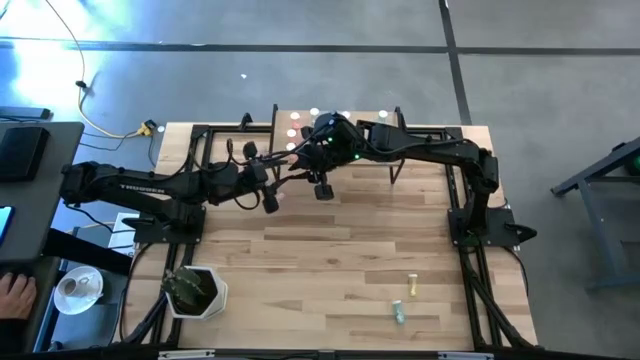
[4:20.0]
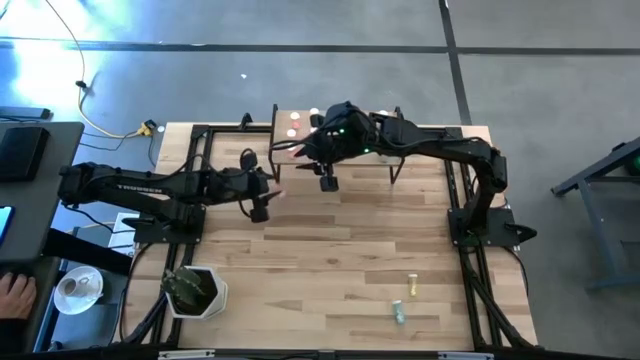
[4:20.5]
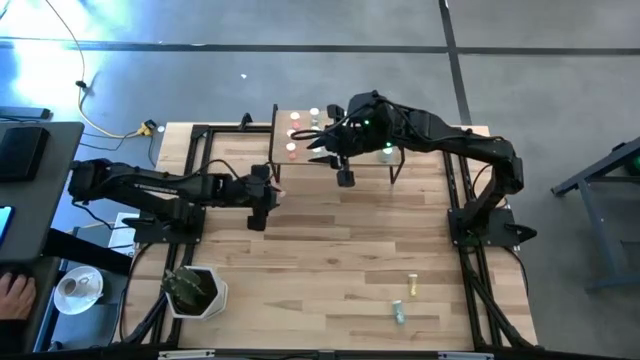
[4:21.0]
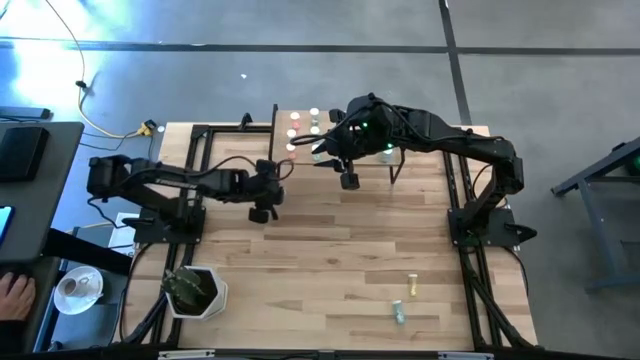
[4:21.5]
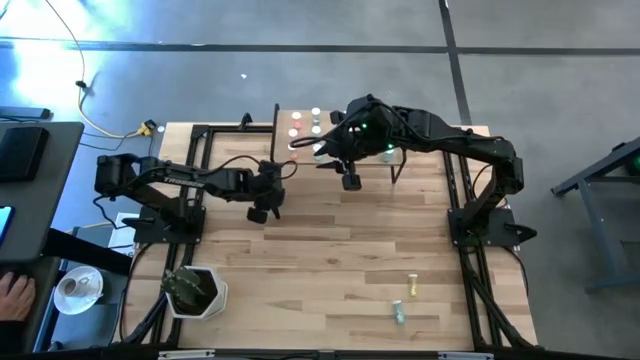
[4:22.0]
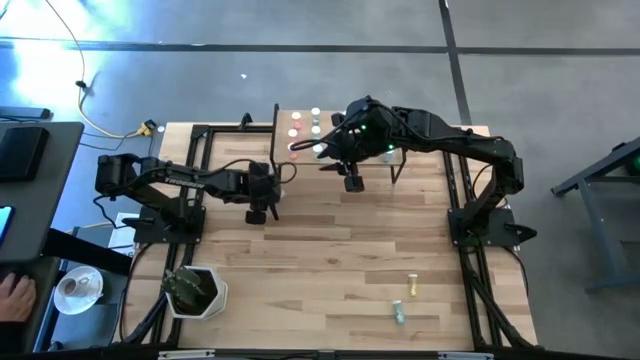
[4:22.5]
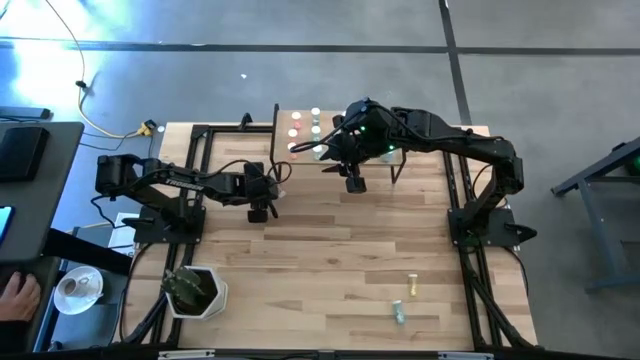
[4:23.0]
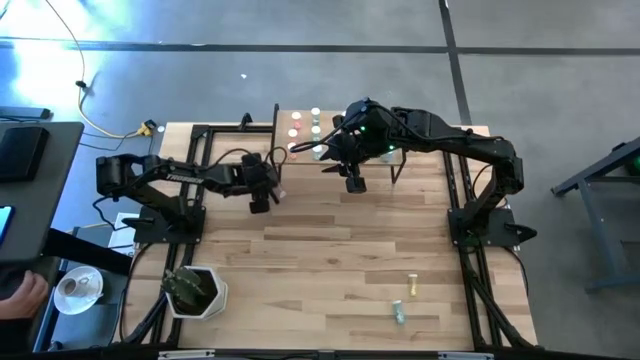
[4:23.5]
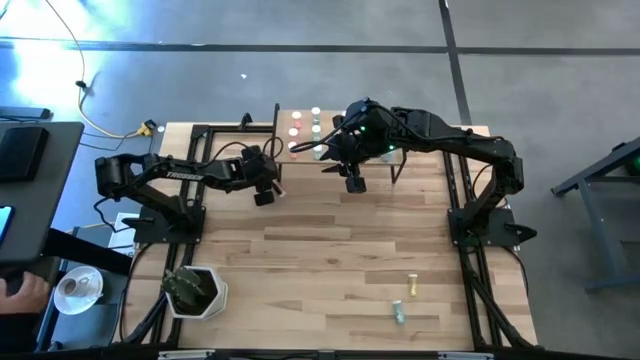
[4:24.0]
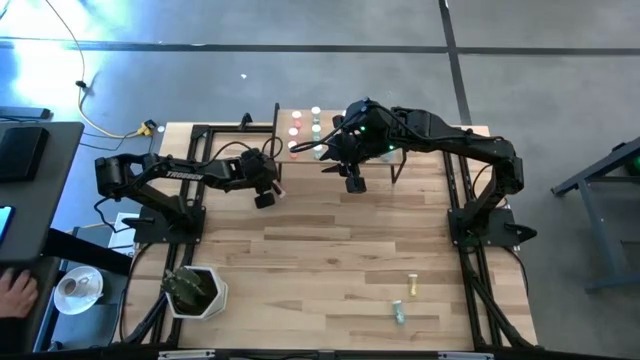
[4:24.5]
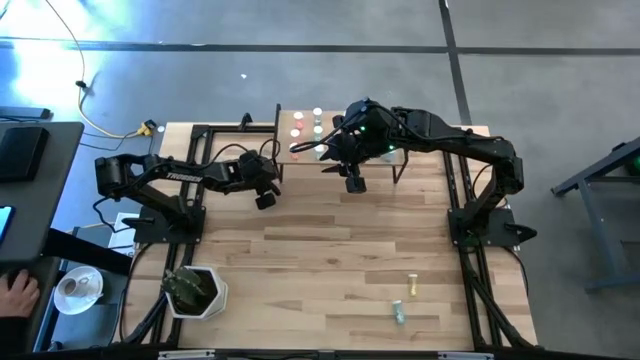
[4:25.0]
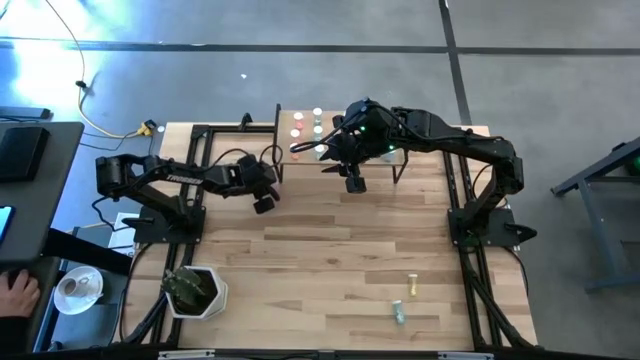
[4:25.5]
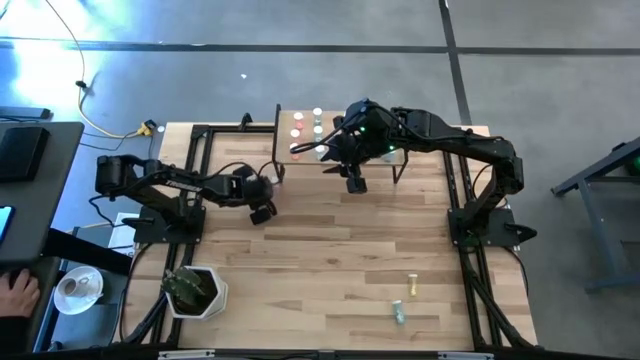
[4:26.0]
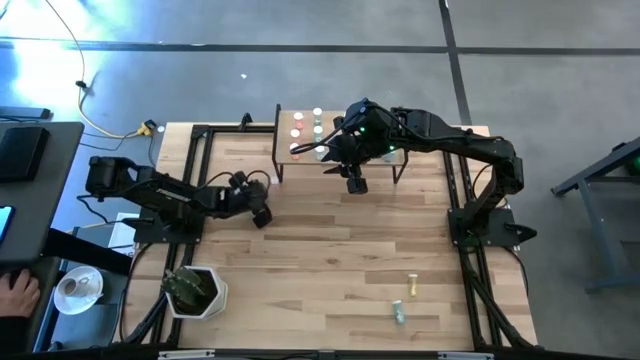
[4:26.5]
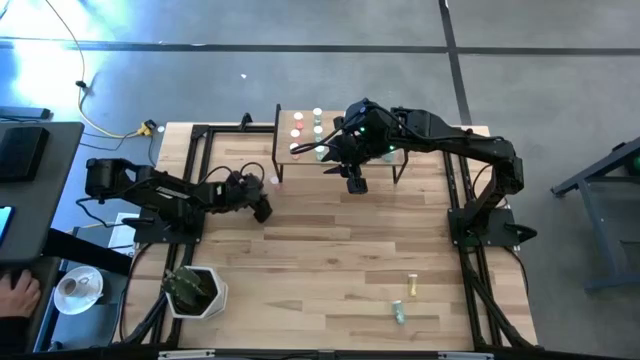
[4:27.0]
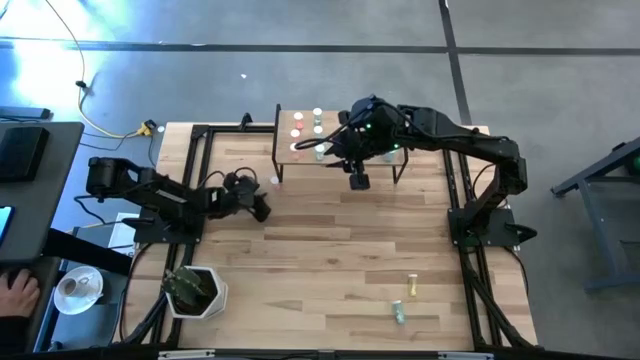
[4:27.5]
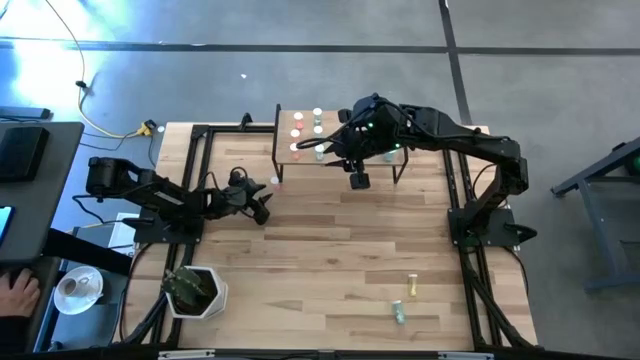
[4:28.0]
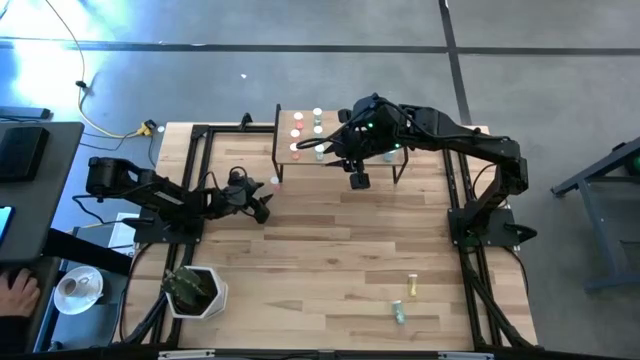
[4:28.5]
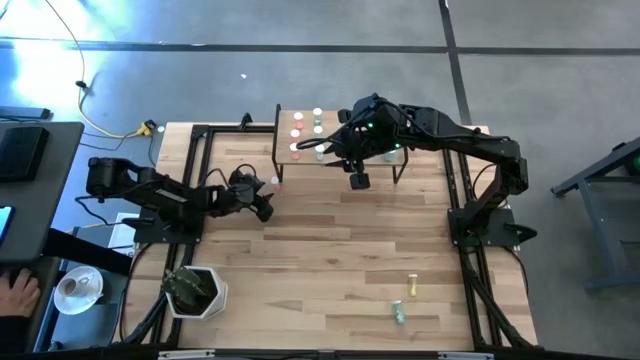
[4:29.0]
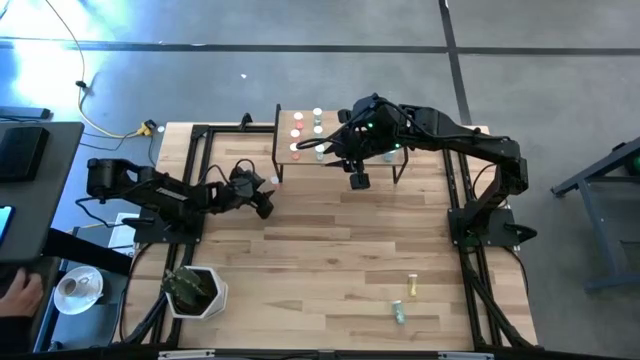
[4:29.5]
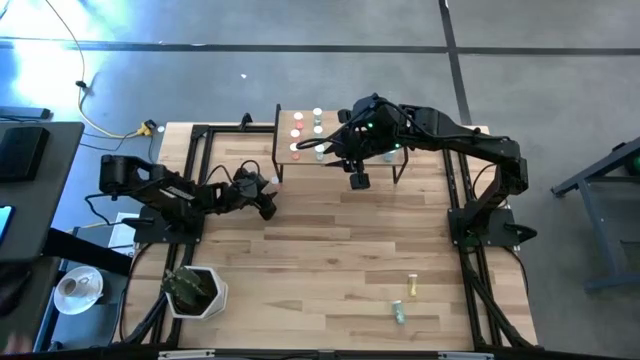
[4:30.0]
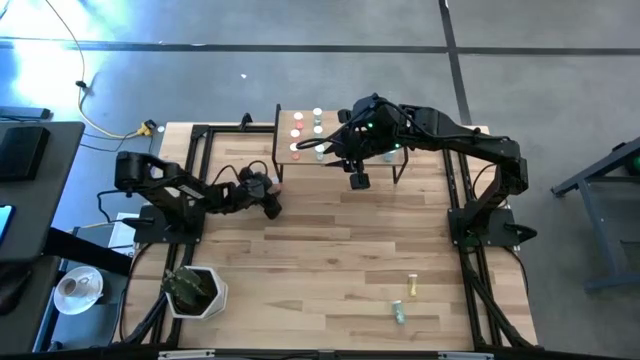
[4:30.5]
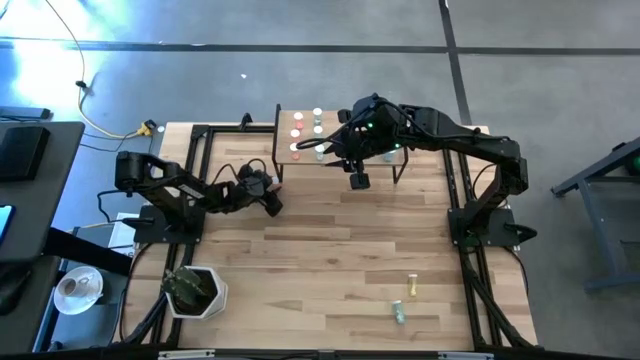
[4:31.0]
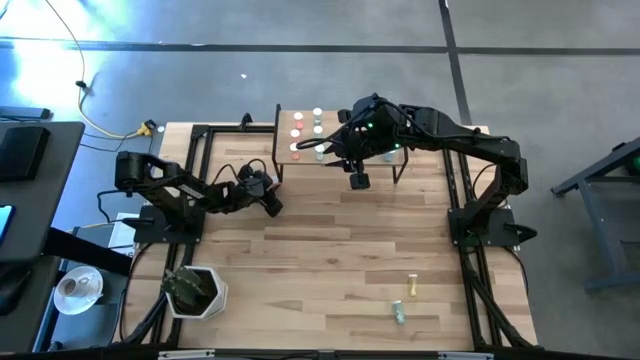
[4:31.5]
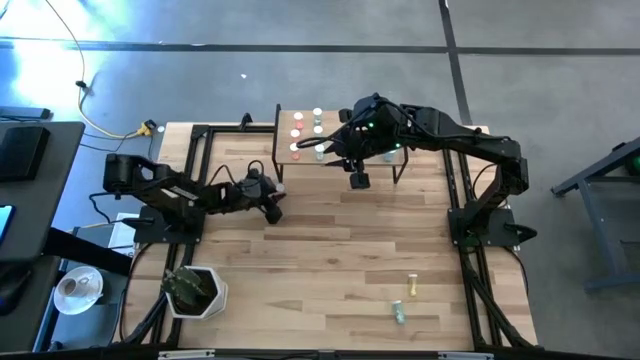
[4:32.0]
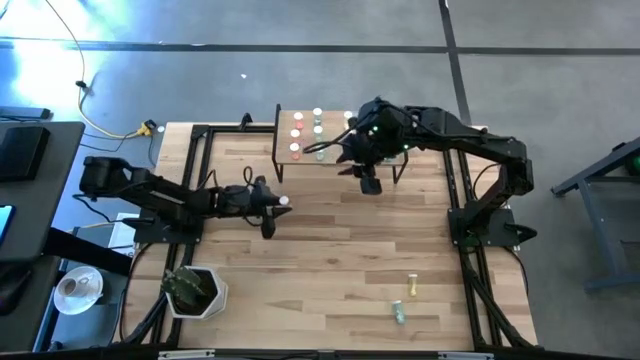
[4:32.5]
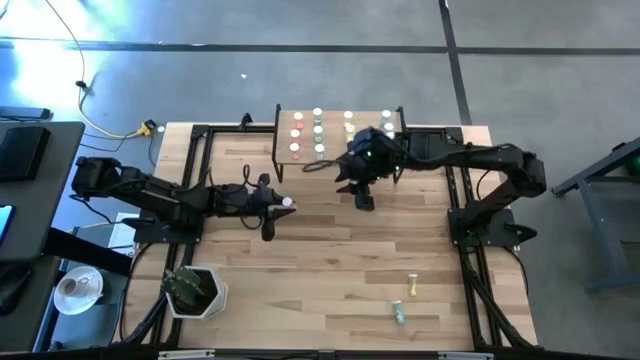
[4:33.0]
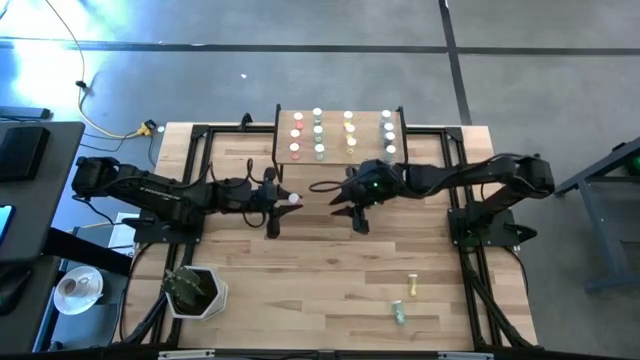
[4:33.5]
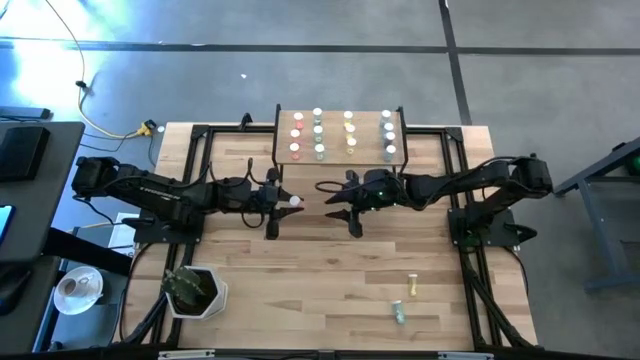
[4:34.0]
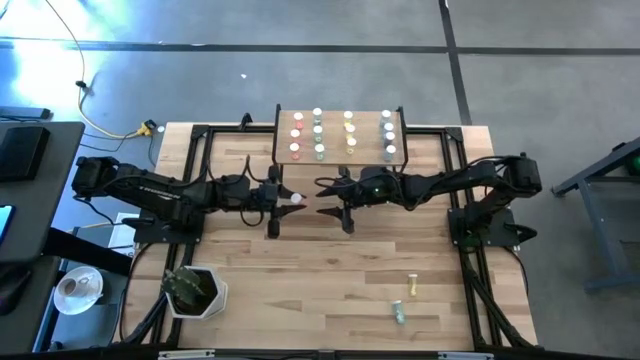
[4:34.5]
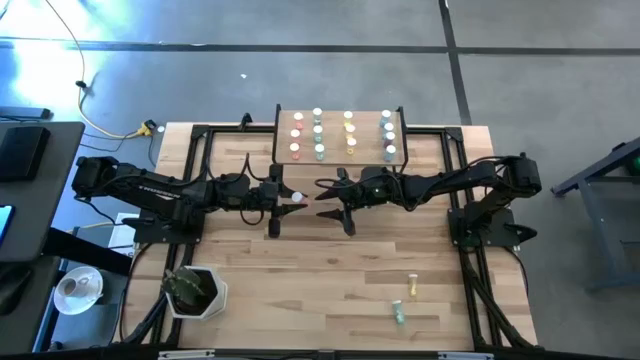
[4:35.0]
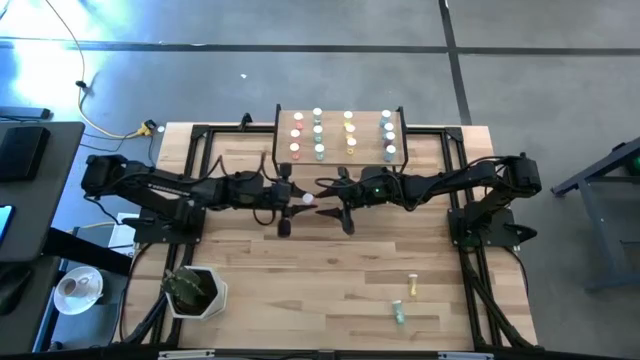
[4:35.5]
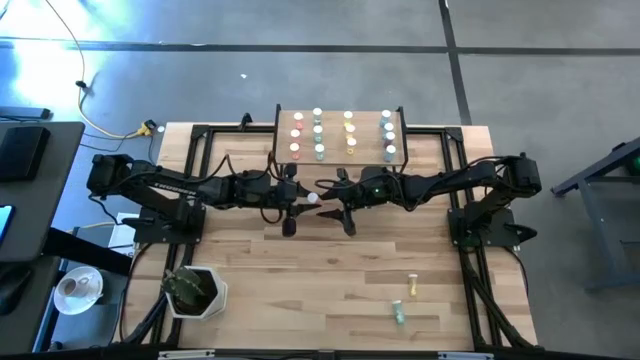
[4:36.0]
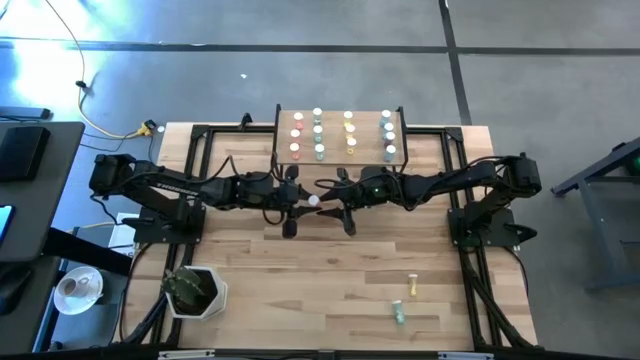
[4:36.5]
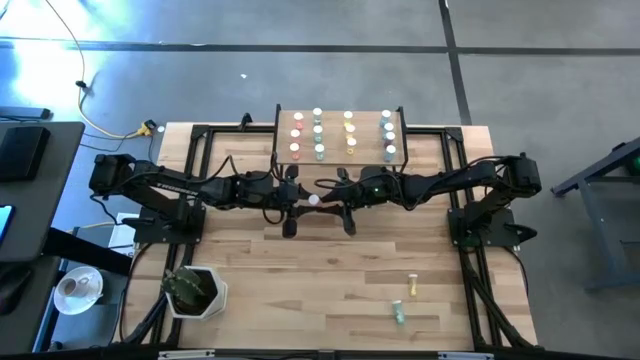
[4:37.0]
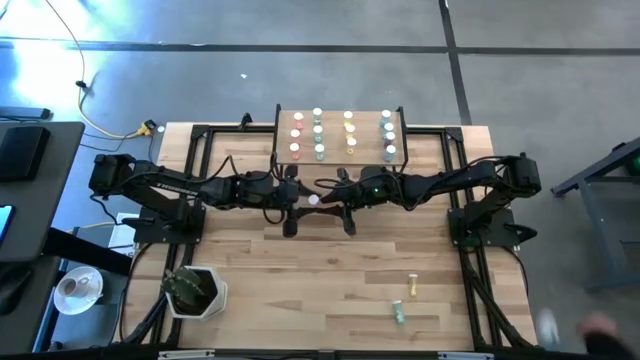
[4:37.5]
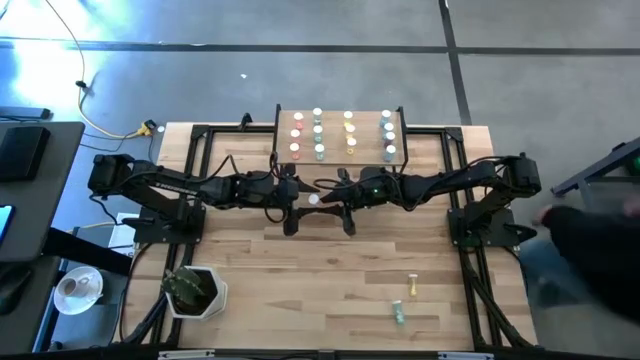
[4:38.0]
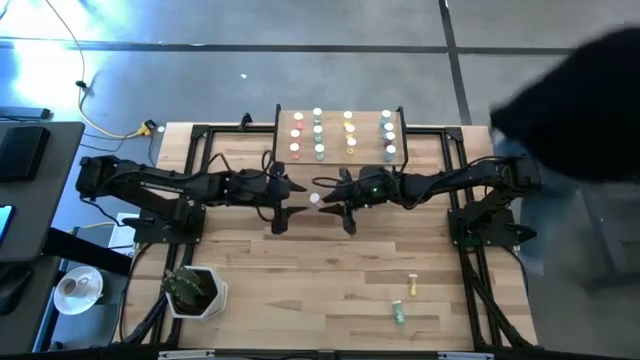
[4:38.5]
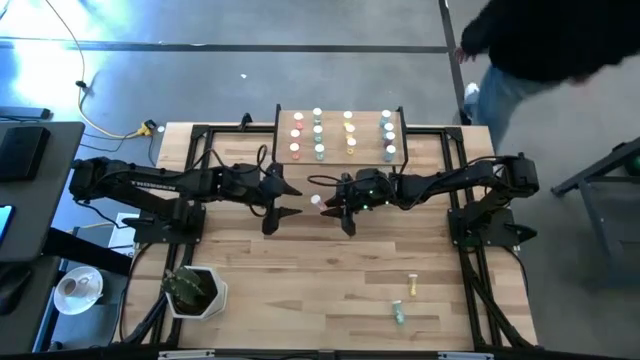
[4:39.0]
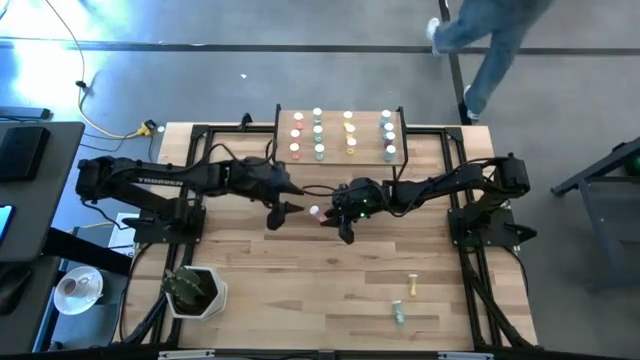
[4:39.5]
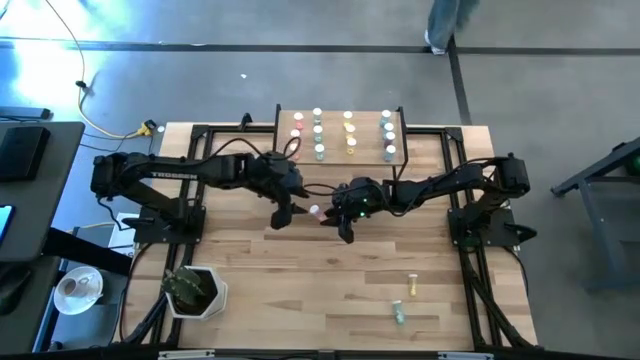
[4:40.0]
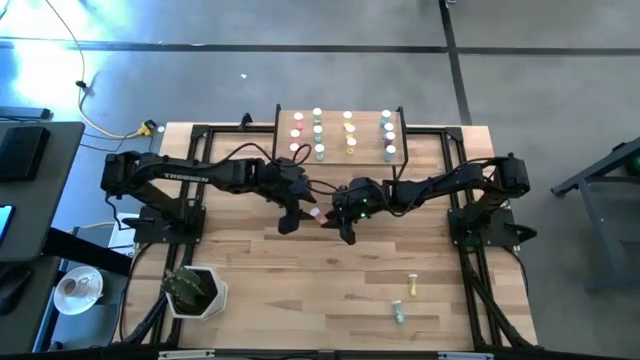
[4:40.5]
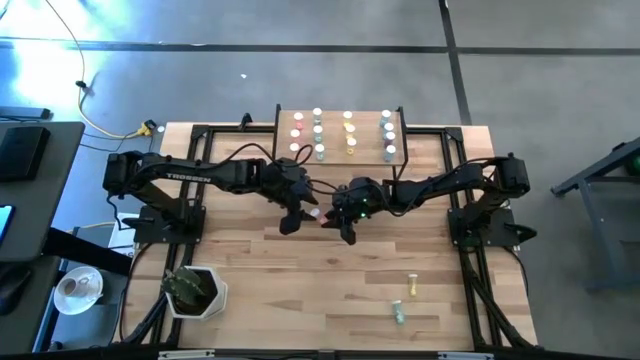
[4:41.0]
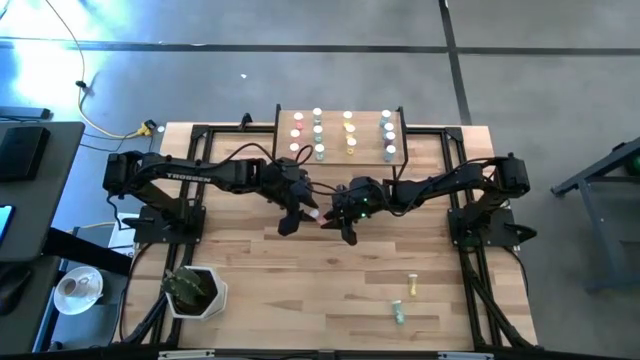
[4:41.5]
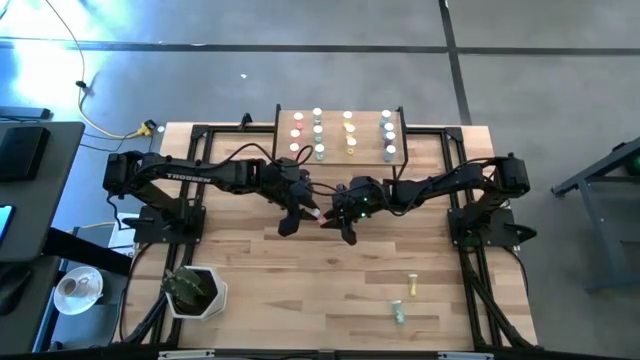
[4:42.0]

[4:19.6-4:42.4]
Task: Pick and place medicine bottles onto shelf by color
Put the red medicine bottle on the shelf
